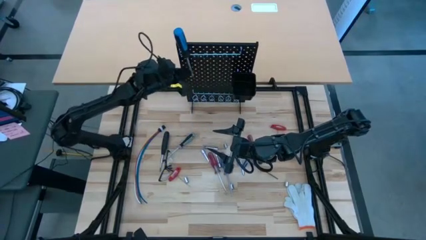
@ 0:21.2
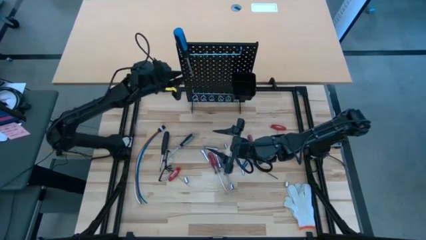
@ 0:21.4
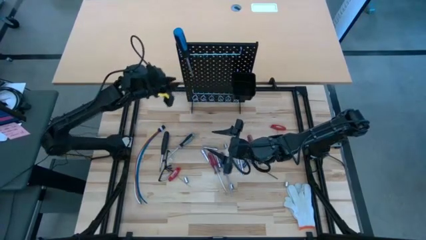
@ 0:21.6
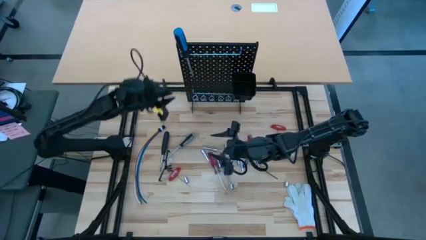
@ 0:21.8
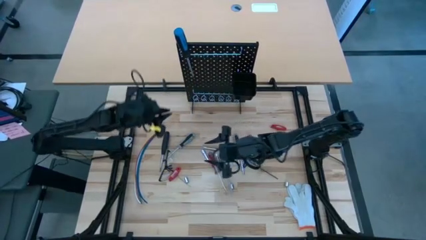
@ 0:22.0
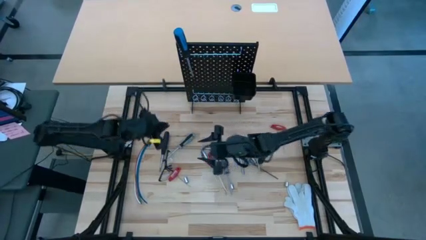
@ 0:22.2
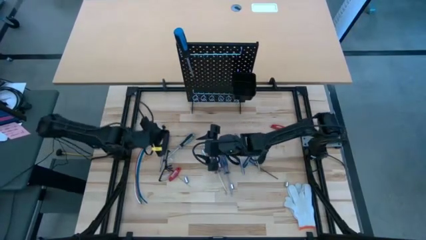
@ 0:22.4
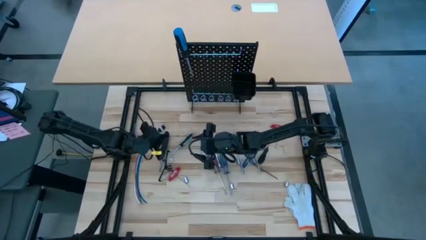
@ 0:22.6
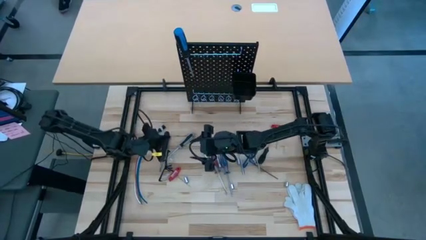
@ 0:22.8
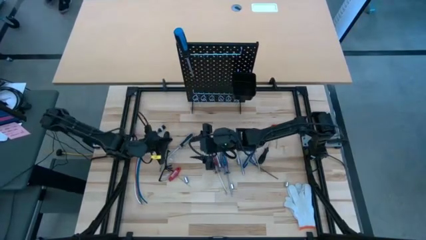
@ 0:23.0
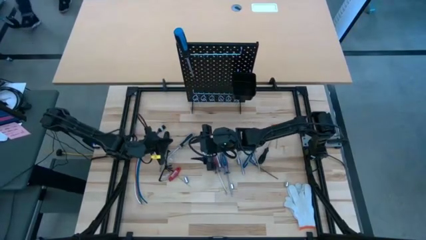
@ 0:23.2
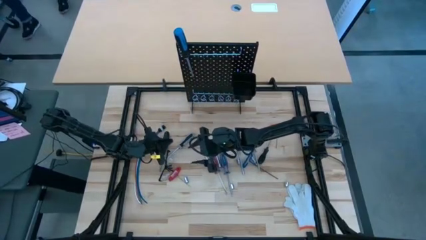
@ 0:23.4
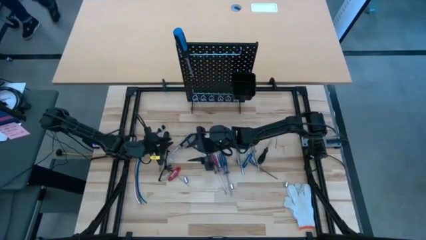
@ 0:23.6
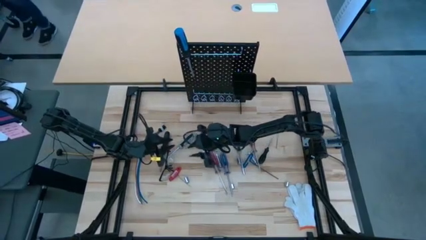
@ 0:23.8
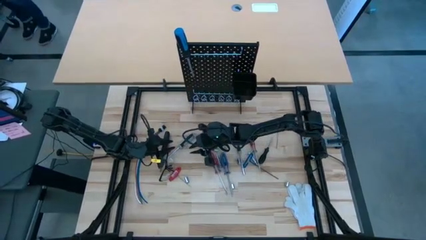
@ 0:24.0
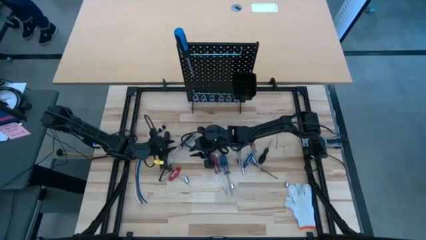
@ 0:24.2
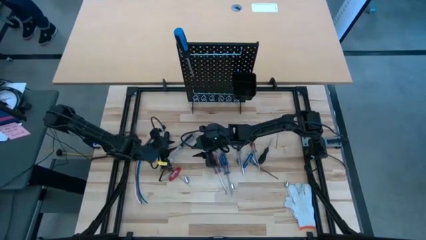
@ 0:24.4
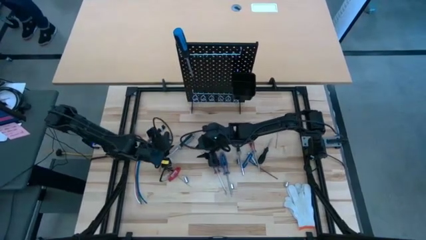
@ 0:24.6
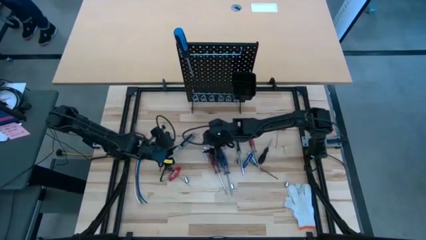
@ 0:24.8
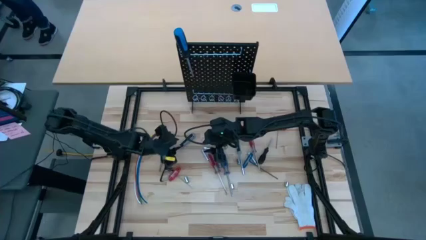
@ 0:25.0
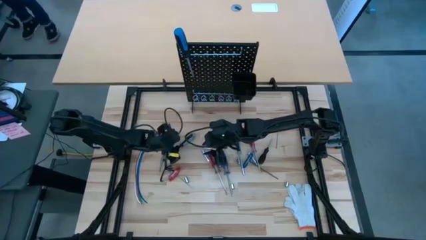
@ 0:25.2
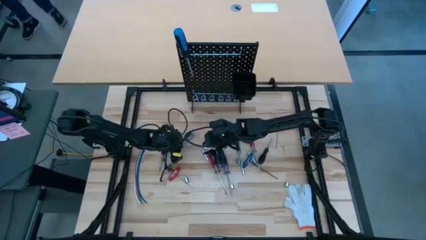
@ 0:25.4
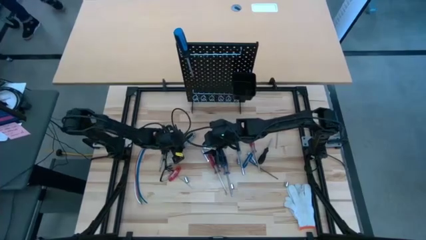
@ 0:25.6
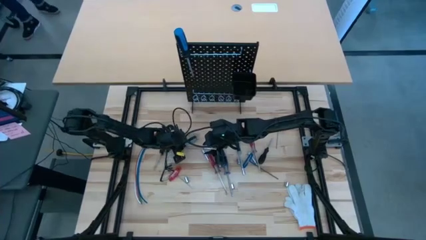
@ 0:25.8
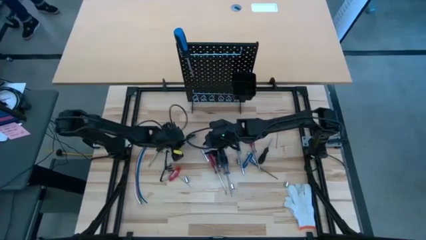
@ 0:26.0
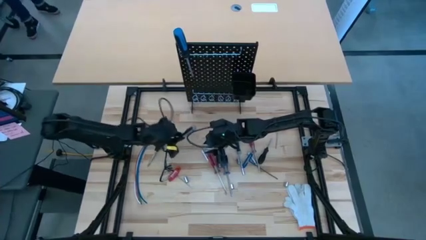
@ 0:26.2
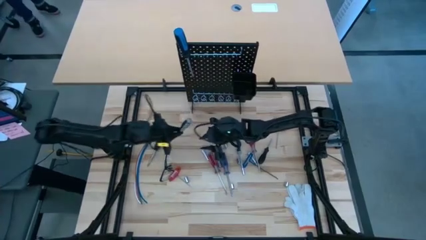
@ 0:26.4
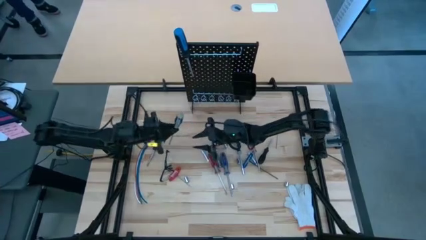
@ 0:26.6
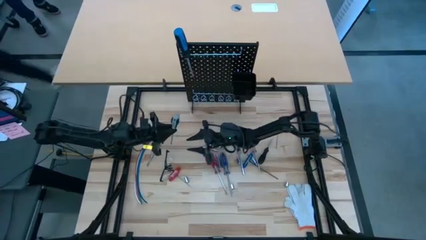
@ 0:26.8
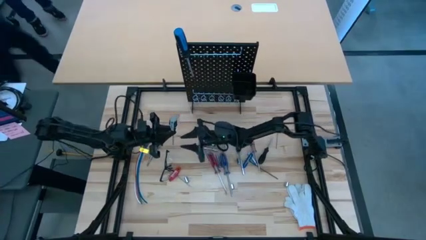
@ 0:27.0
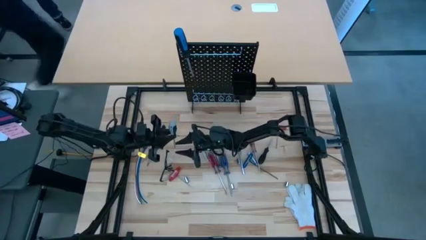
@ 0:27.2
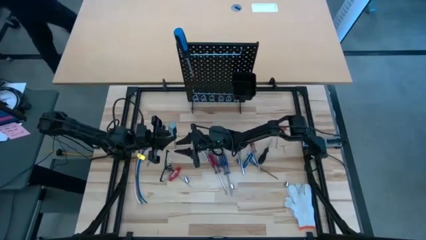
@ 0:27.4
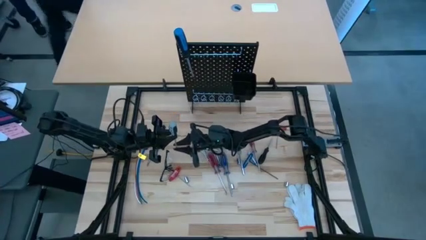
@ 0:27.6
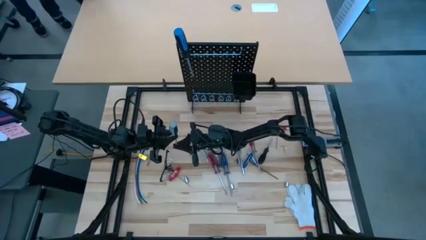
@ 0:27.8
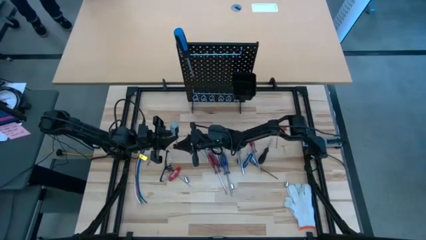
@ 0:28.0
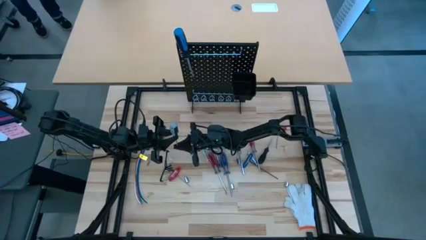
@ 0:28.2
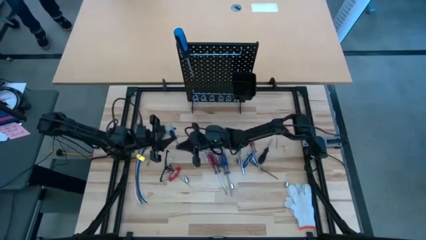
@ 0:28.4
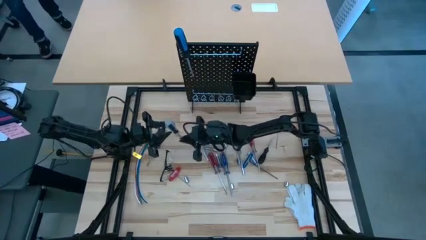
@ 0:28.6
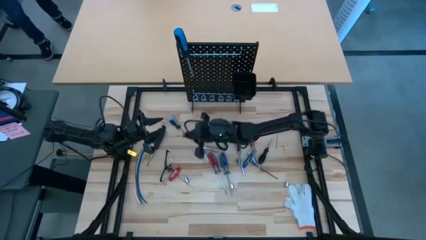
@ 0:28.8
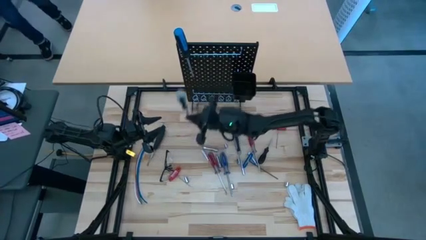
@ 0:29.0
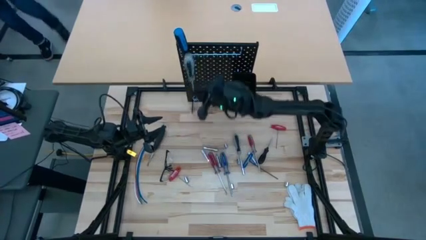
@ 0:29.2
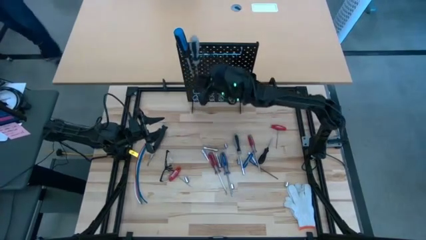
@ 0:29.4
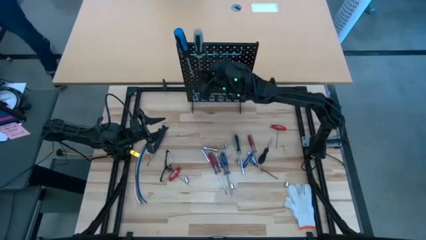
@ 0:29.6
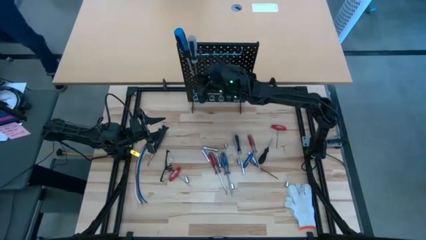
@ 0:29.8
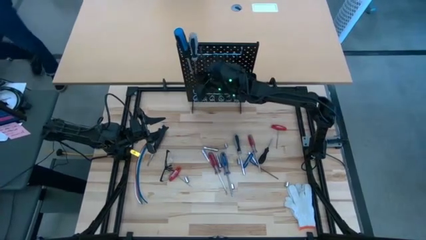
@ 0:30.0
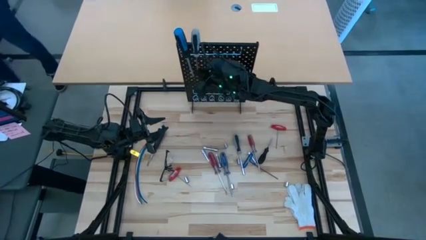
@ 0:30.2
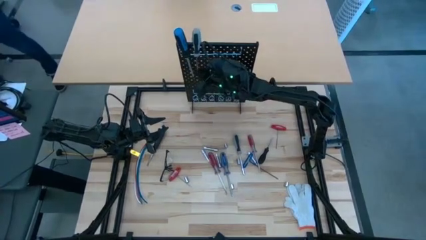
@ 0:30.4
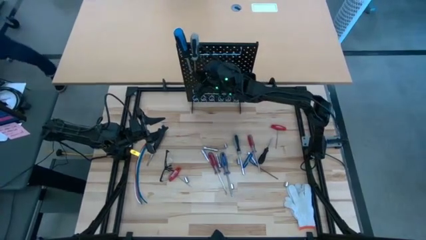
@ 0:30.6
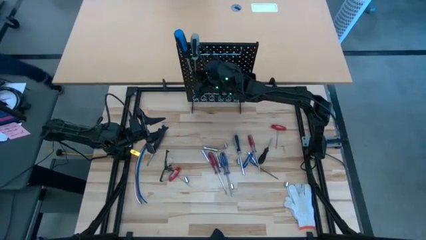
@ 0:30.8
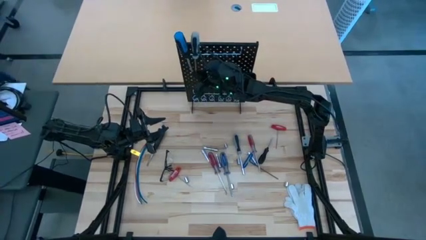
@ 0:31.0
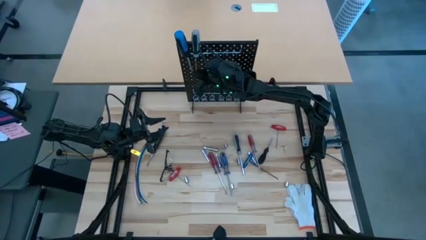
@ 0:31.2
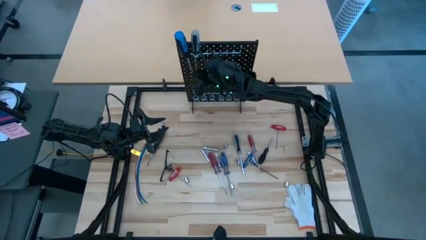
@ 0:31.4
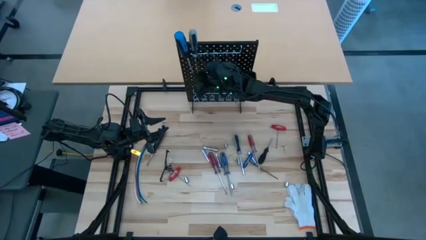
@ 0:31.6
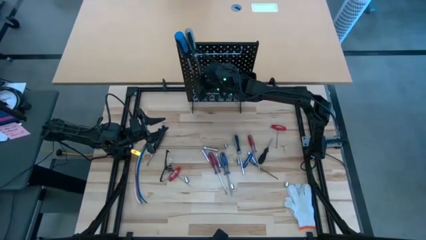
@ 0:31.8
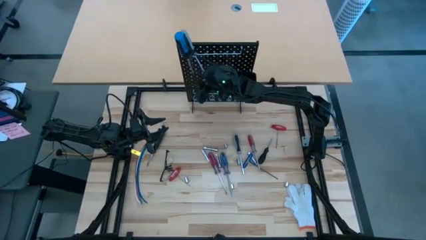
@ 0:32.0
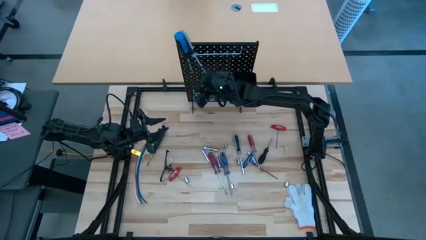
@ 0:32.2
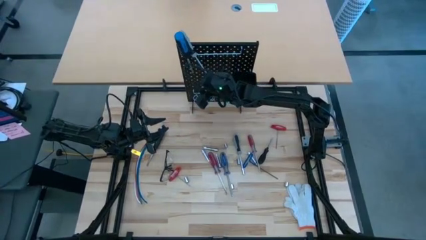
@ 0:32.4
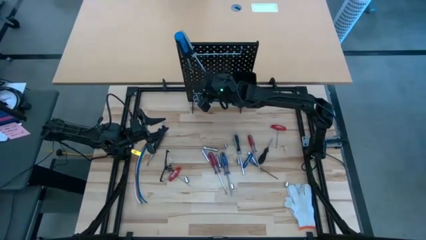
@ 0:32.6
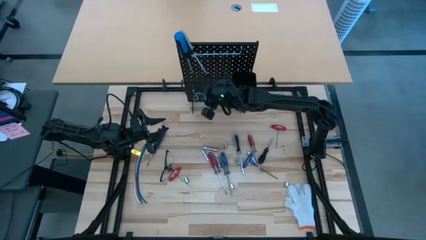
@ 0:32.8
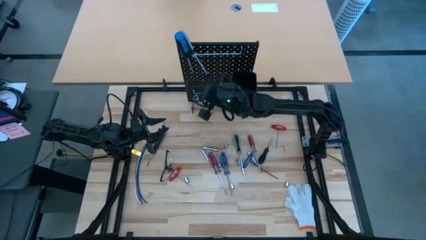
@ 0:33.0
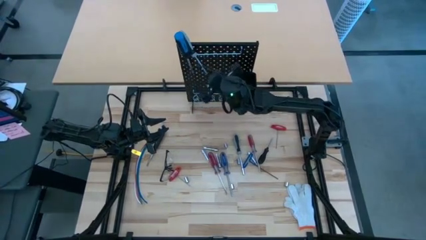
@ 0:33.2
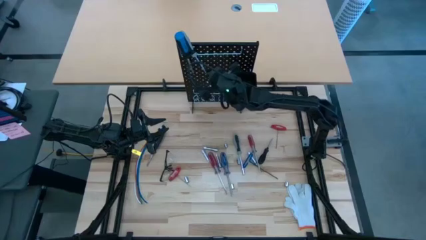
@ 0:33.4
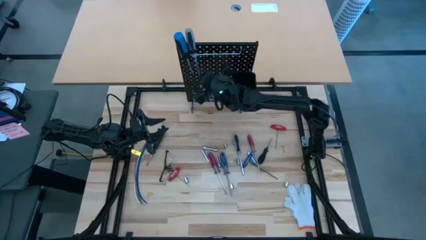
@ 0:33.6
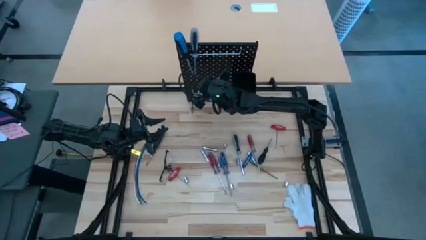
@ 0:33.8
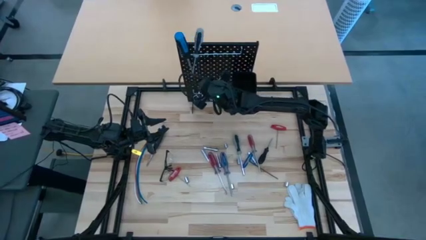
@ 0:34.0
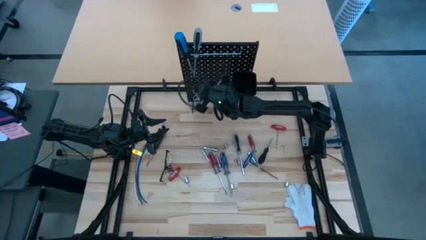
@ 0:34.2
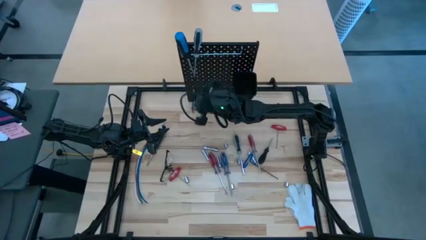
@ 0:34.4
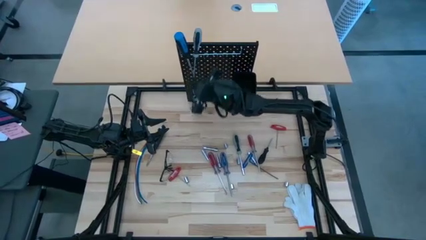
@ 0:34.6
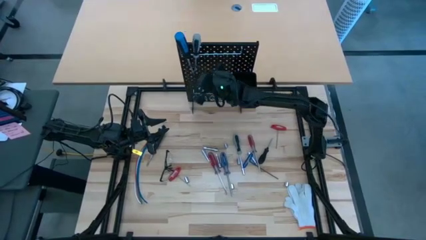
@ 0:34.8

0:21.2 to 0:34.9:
Task: Hang tools onto peg board
Hang the gray screwdriver on the pegboard
